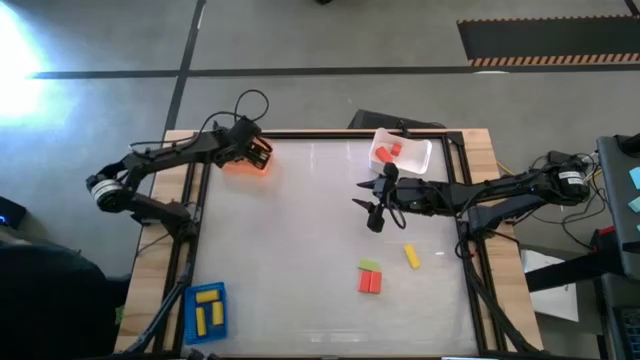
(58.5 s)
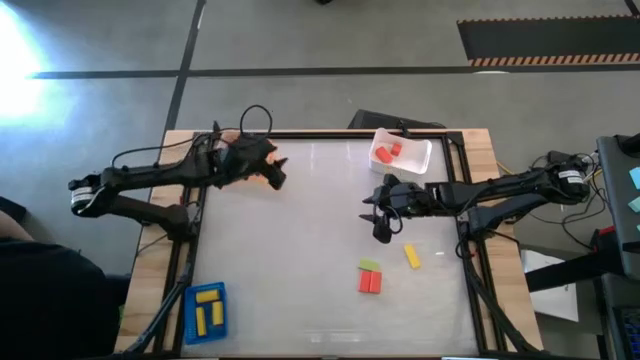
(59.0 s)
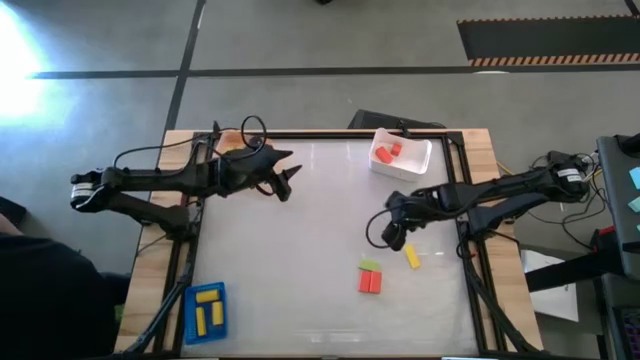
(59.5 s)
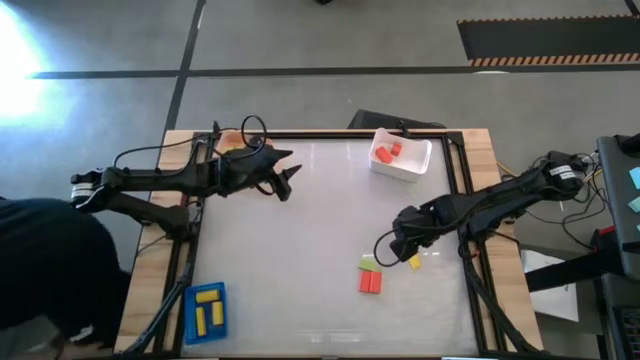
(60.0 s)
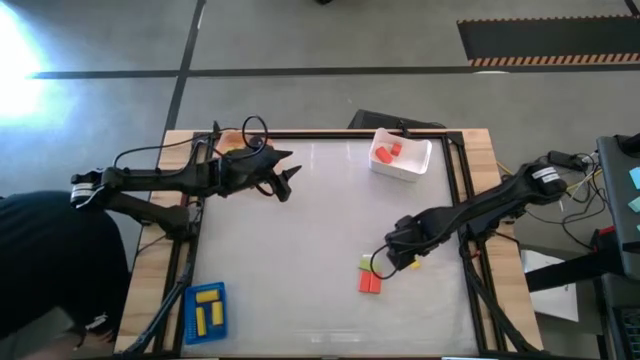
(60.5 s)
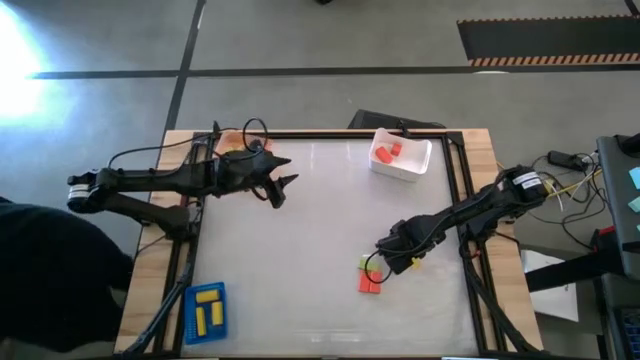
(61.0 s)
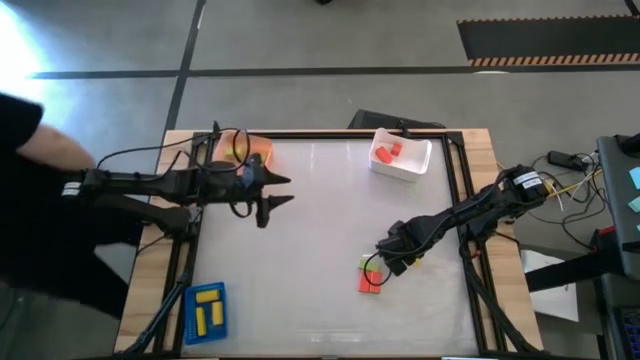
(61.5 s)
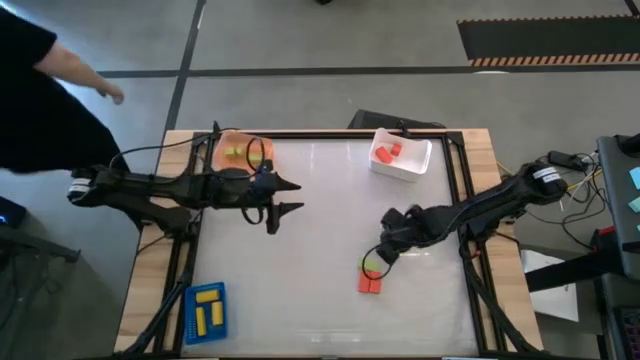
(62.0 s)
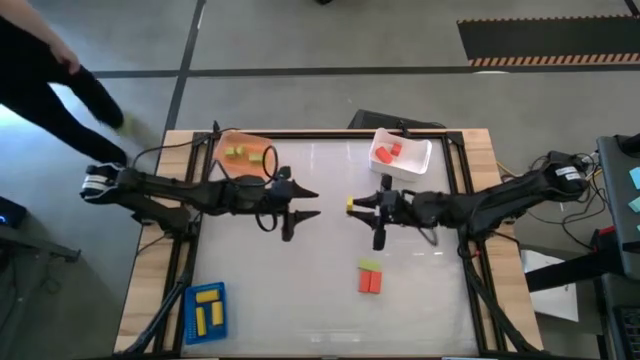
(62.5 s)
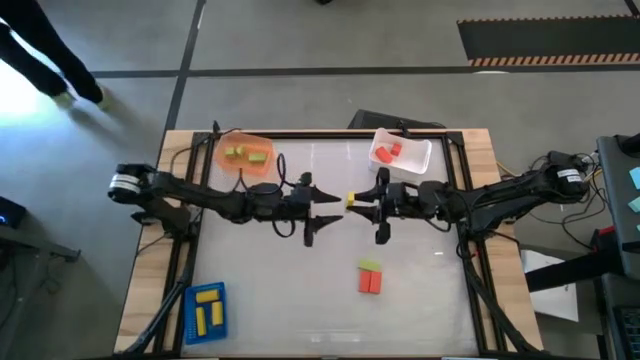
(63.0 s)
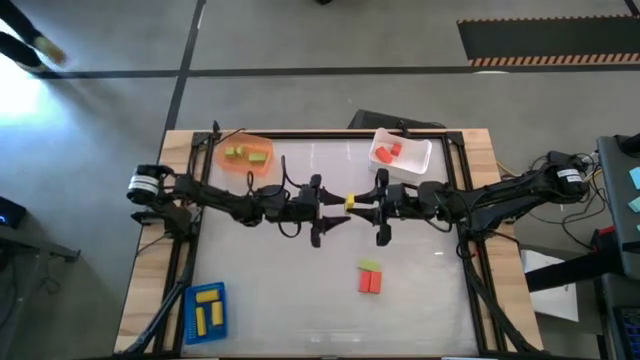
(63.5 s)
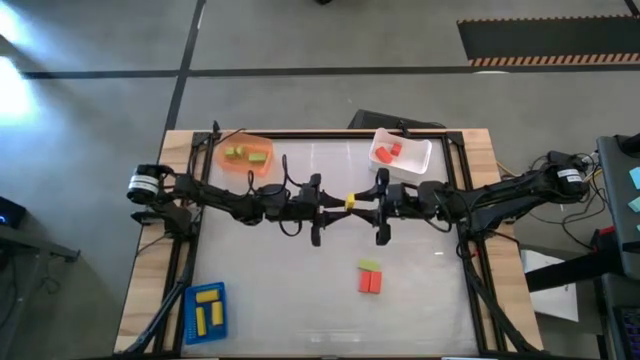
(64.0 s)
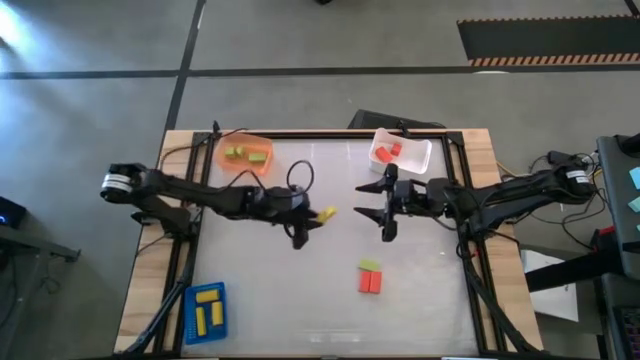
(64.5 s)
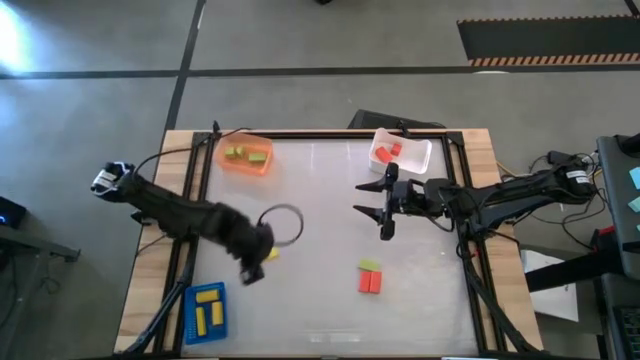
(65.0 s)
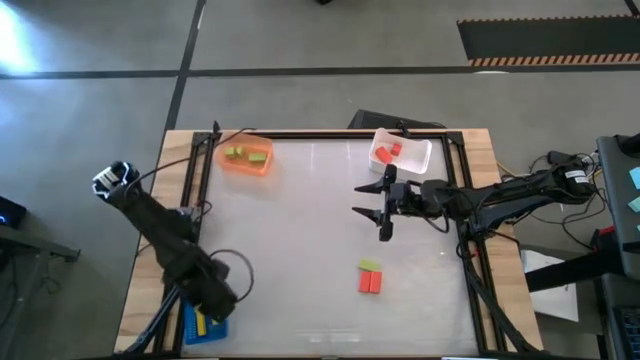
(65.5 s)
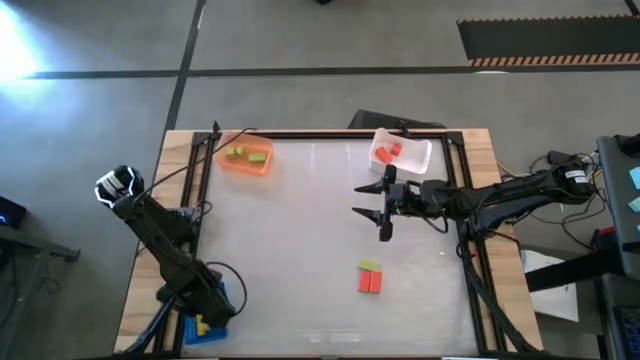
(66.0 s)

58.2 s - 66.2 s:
Task: Sort & place blocks by color
Put the yellow rectangular block into the blue basket

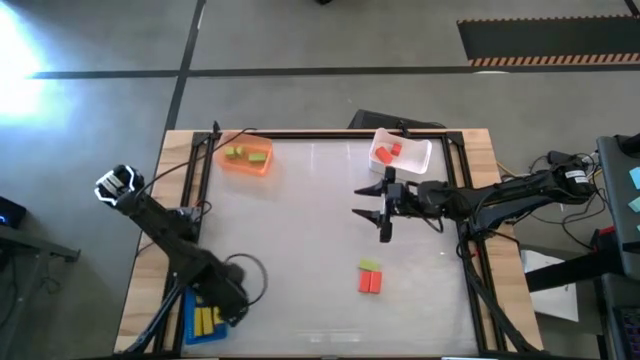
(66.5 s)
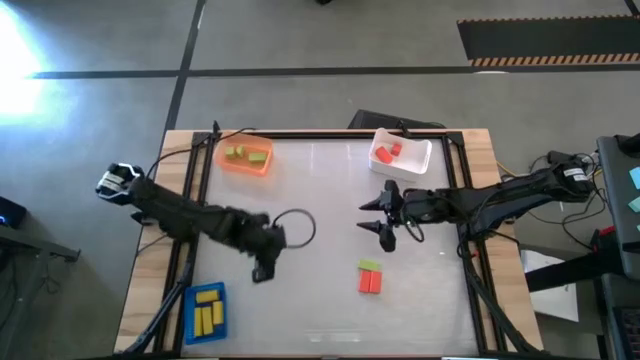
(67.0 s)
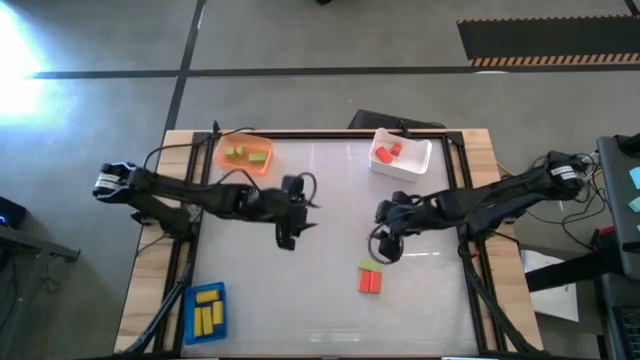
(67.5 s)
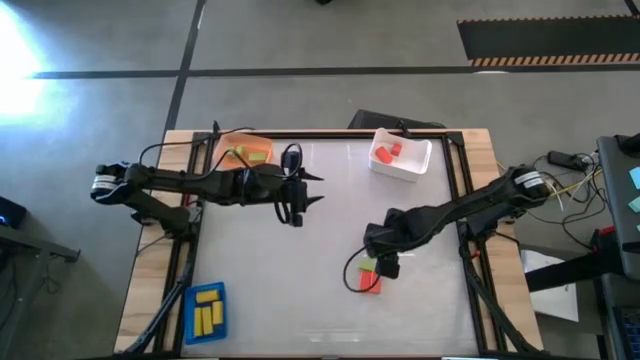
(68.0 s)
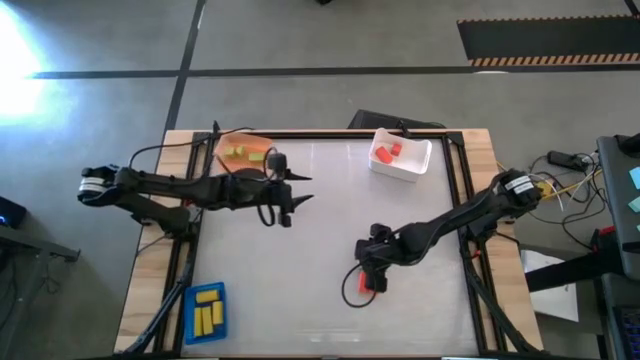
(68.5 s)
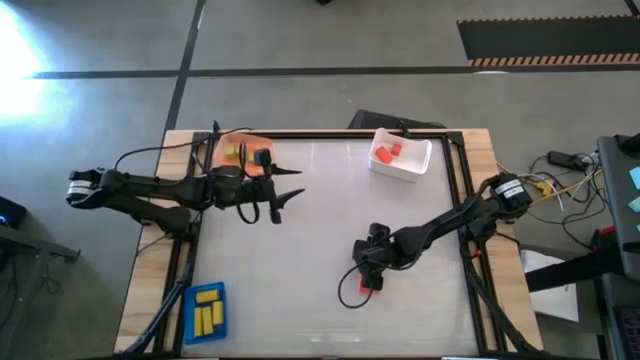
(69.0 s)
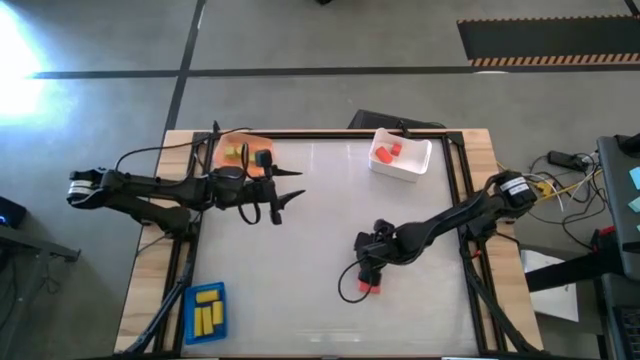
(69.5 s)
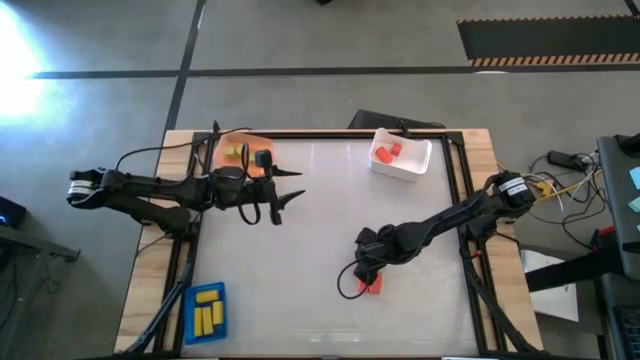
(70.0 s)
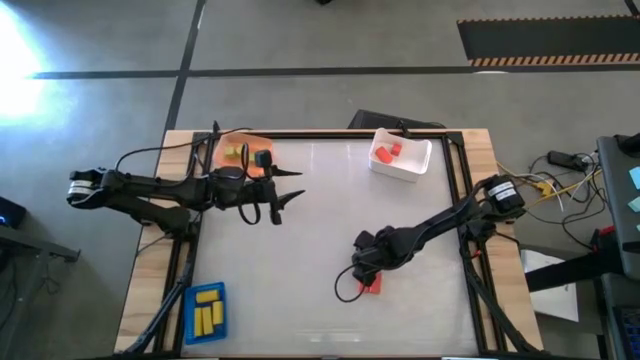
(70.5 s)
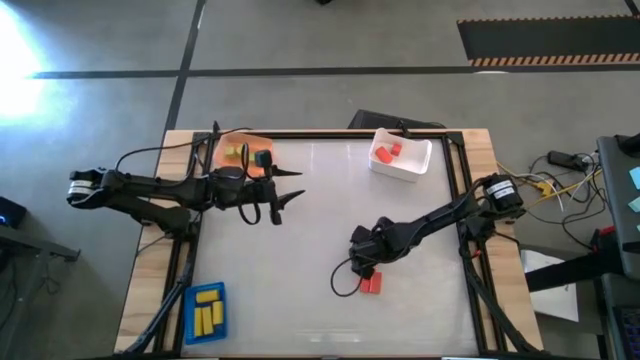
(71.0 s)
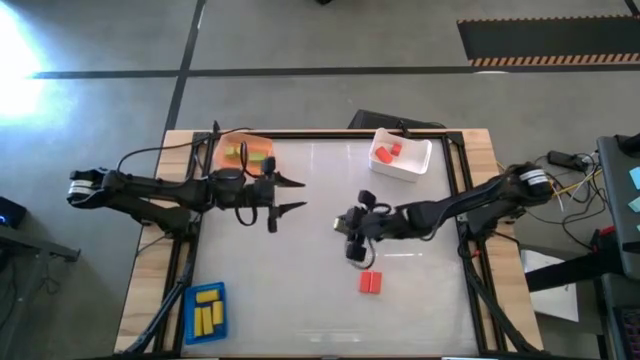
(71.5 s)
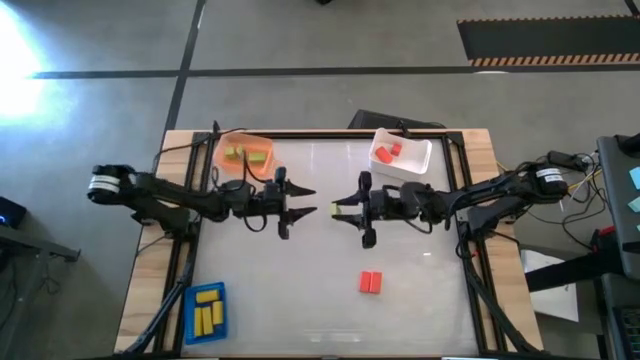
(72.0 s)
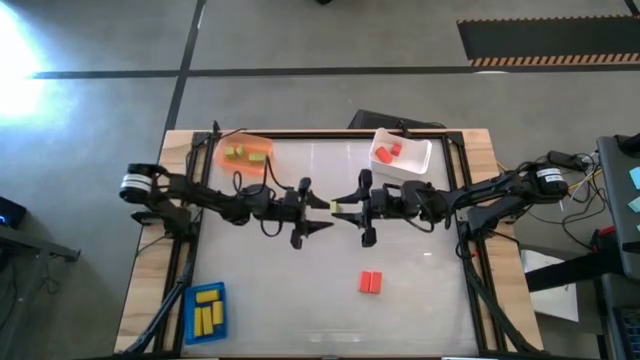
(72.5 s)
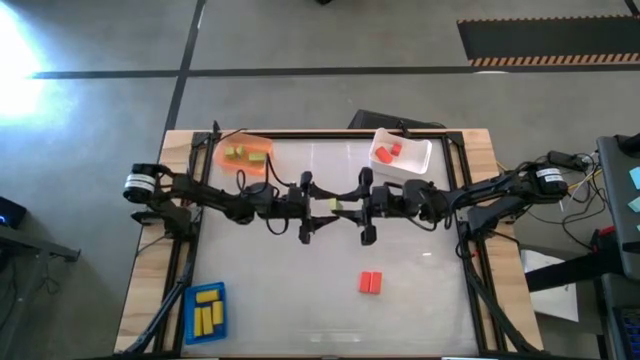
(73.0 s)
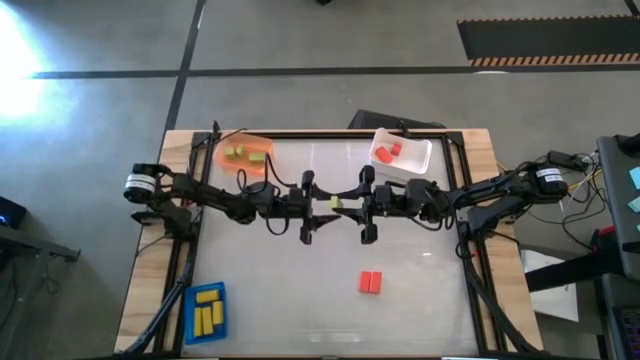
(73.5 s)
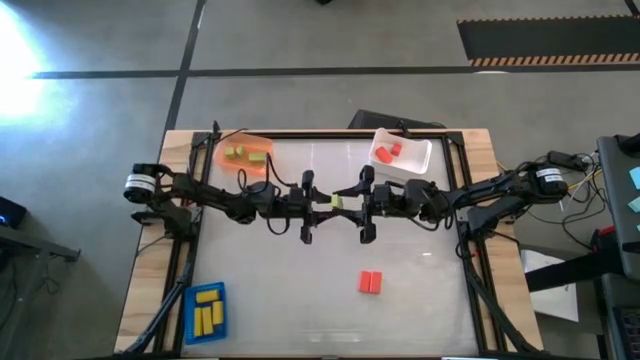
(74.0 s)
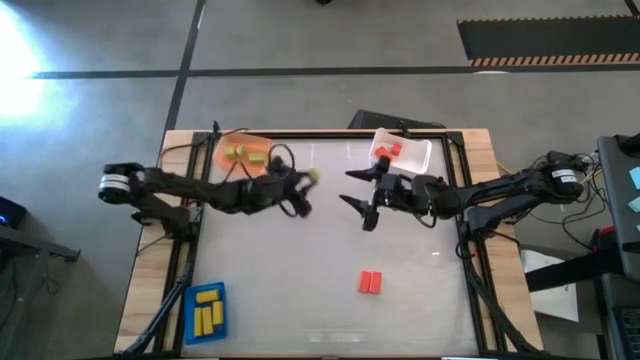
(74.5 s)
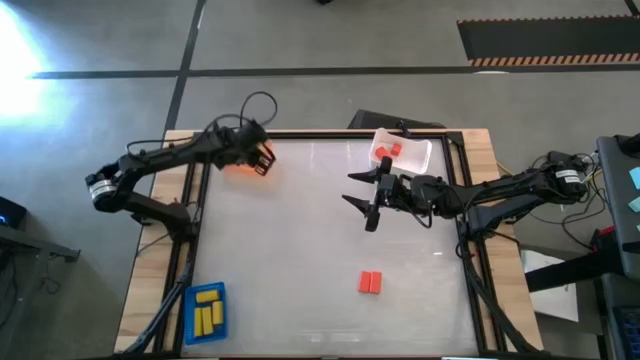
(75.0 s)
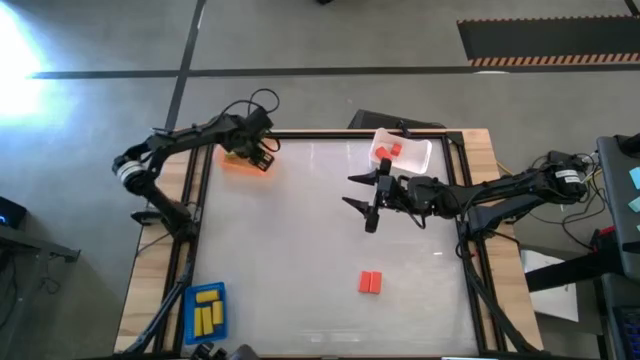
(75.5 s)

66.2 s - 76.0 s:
Put the green rectangular block into the orange bin

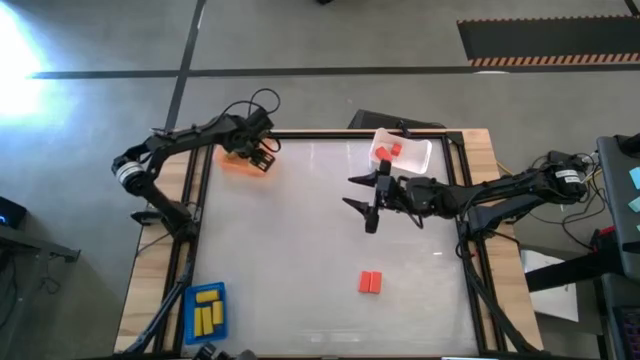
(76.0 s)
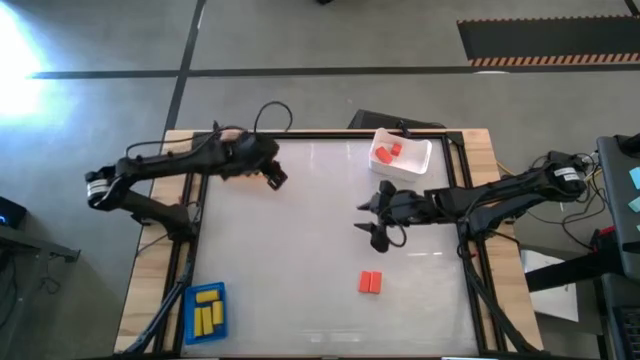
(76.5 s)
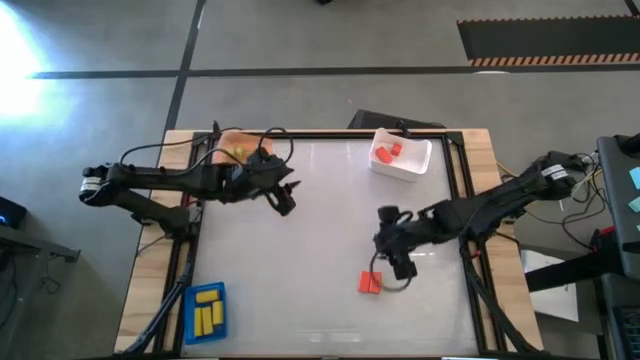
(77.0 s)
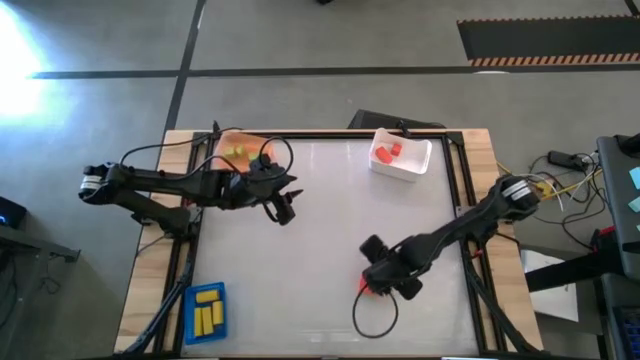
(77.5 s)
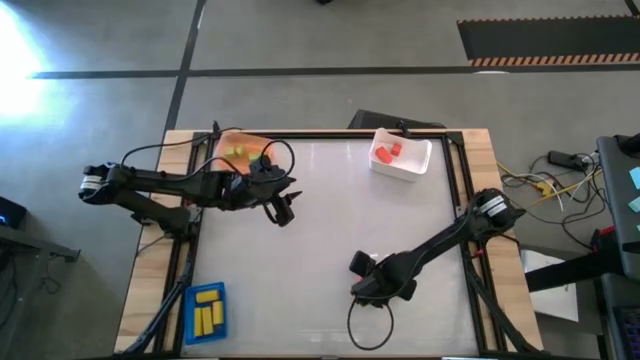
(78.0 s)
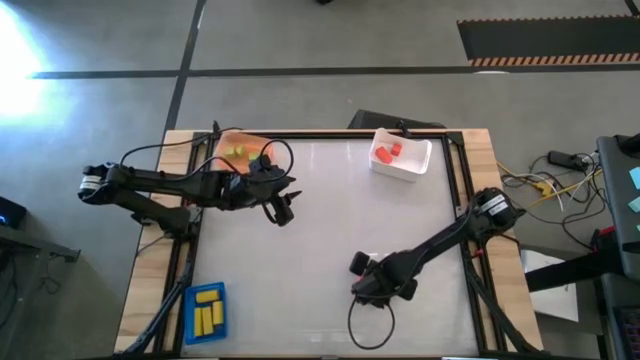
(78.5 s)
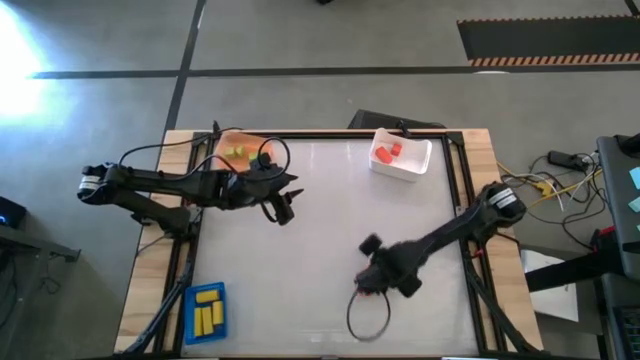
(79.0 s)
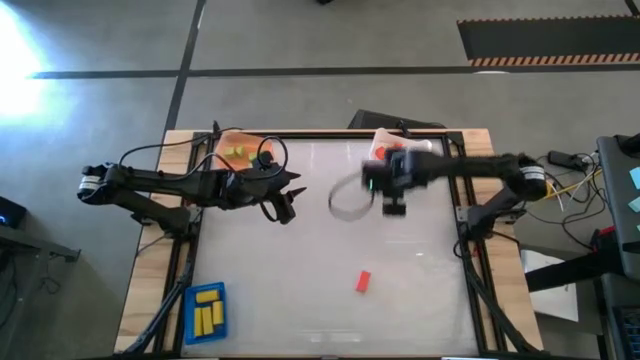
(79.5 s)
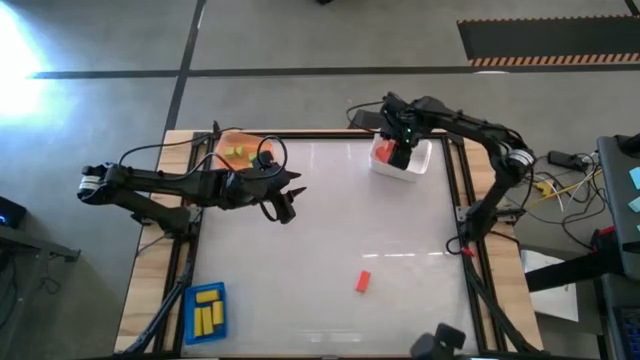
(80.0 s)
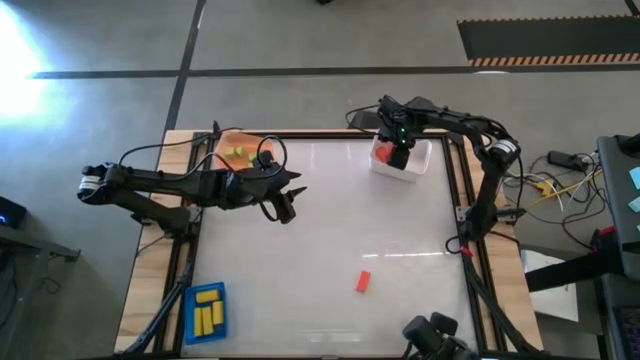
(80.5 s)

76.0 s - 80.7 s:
Put the right orange rectangular block into the white bin
